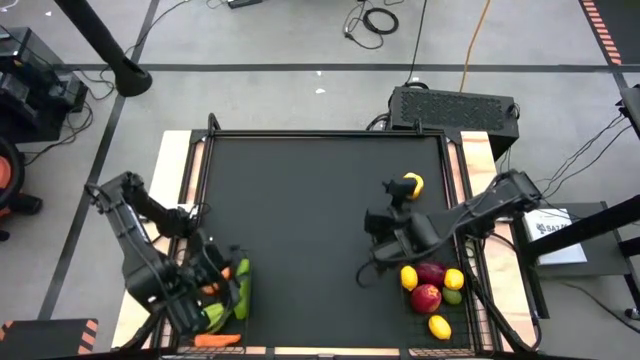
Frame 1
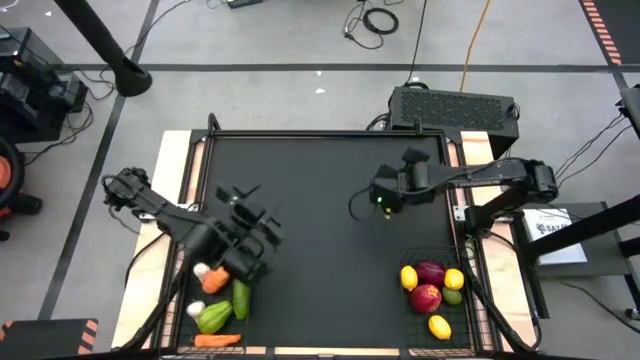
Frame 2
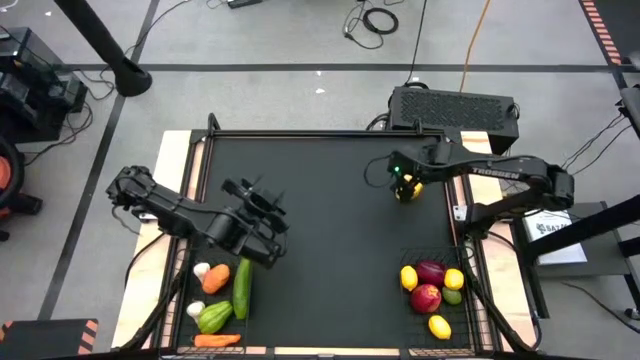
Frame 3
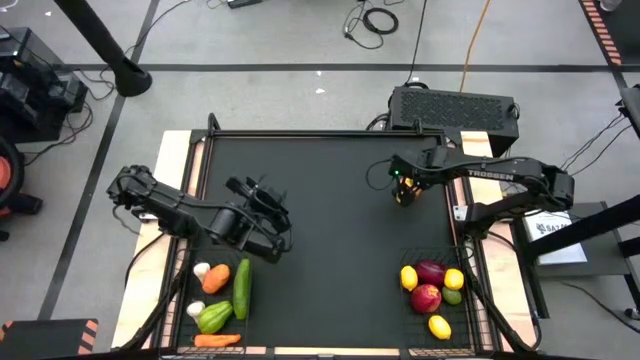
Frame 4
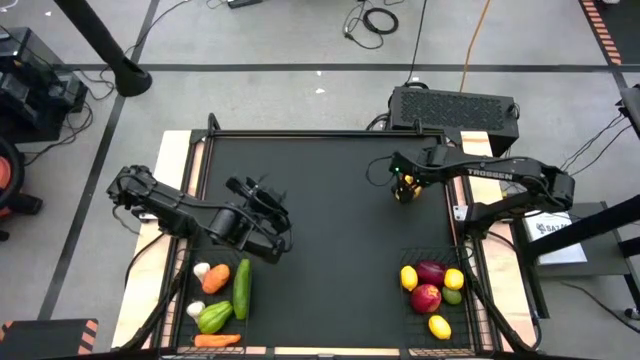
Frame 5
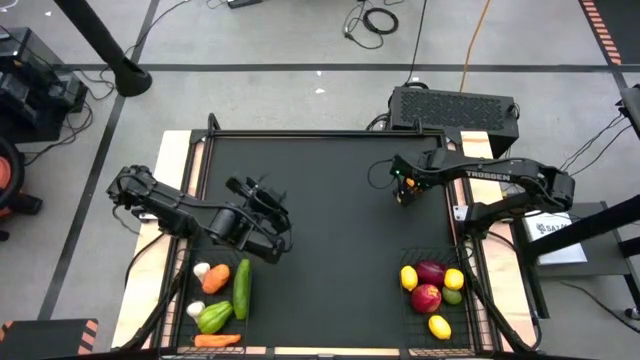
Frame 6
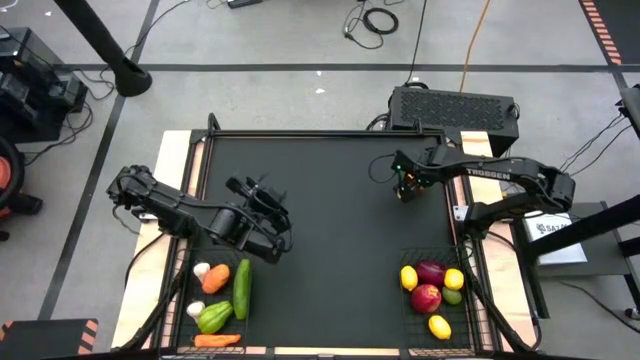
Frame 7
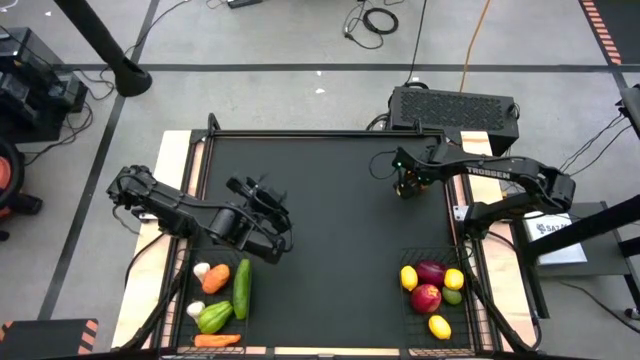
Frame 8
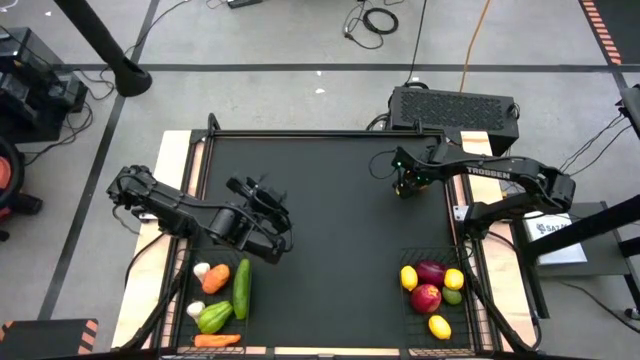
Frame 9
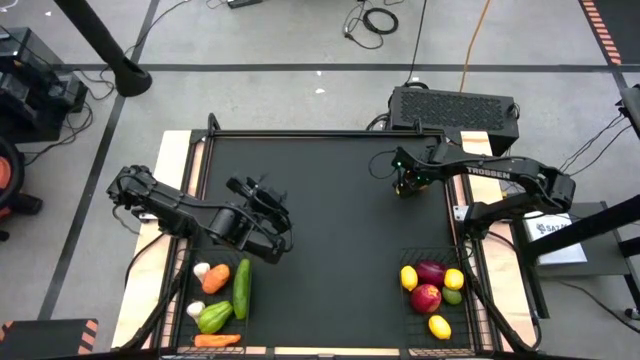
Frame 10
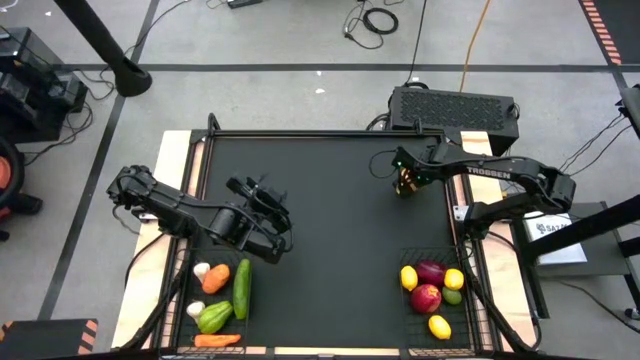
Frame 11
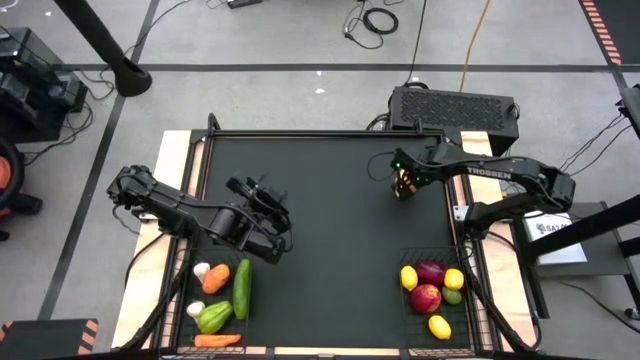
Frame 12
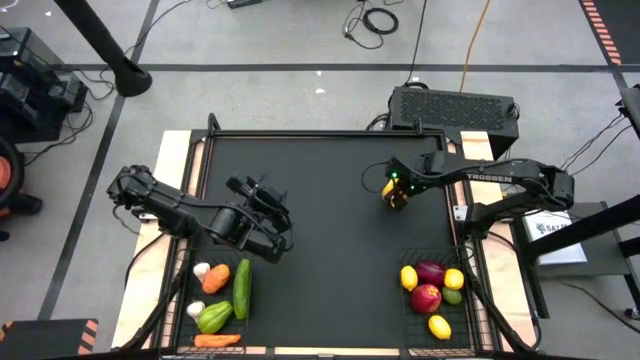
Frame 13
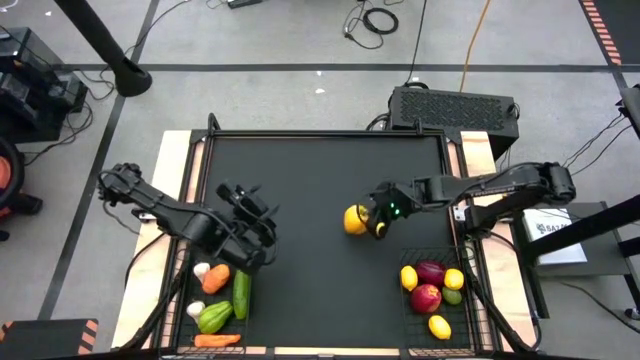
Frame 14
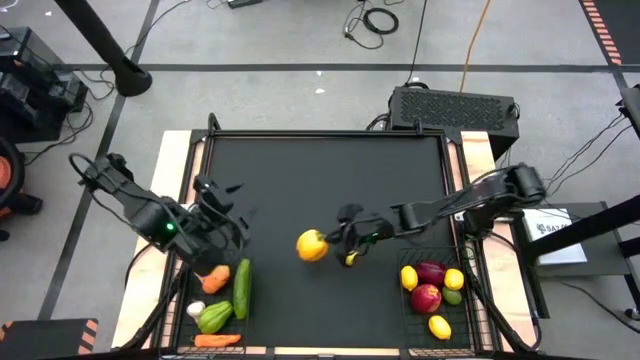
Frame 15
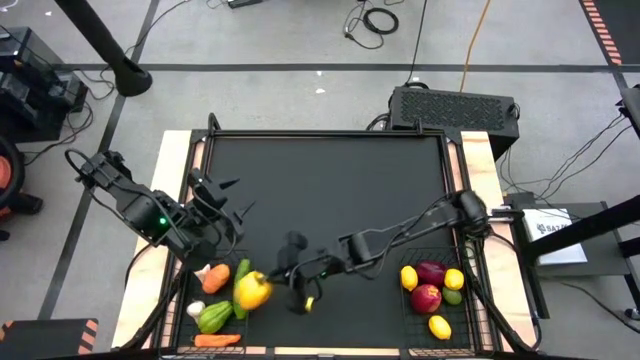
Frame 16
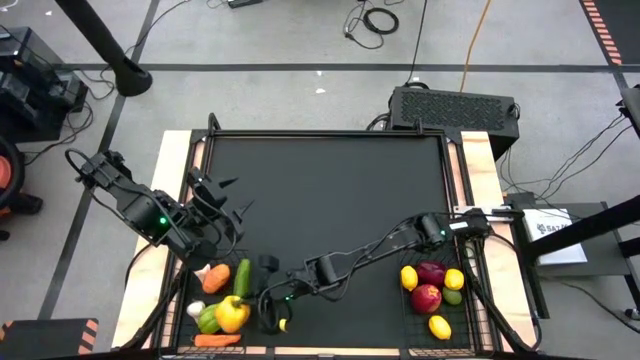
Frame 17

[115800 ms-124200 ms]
Task: Sort produce into baskets
Put the yellow capsicum into the bottom left basket

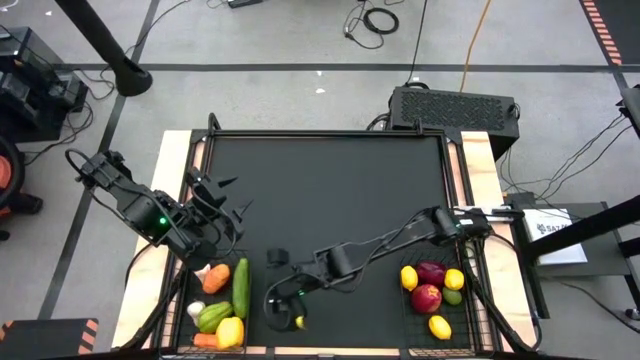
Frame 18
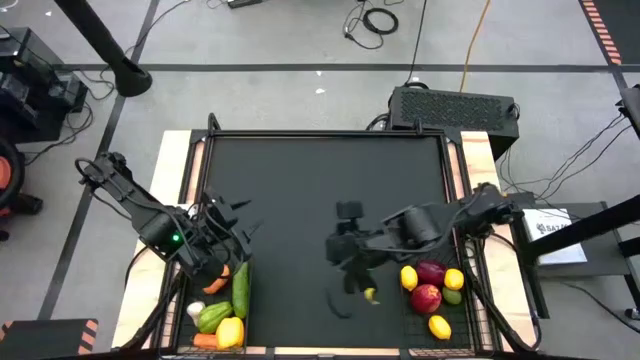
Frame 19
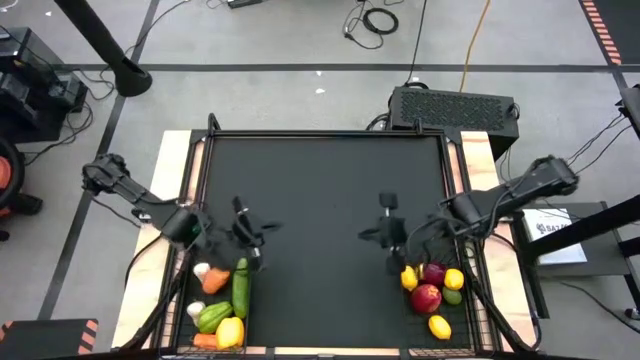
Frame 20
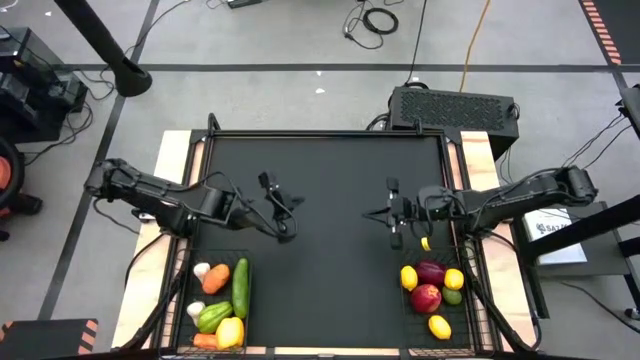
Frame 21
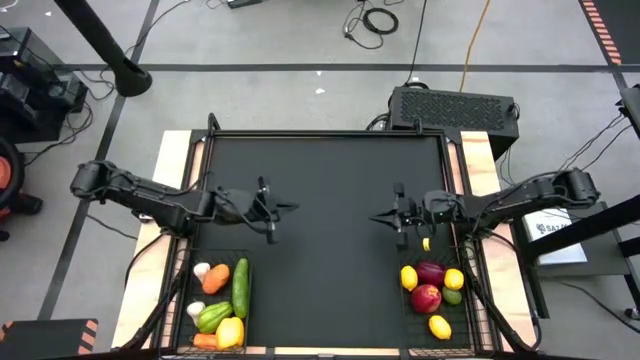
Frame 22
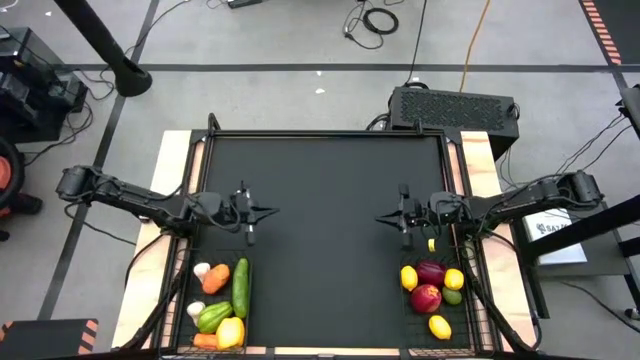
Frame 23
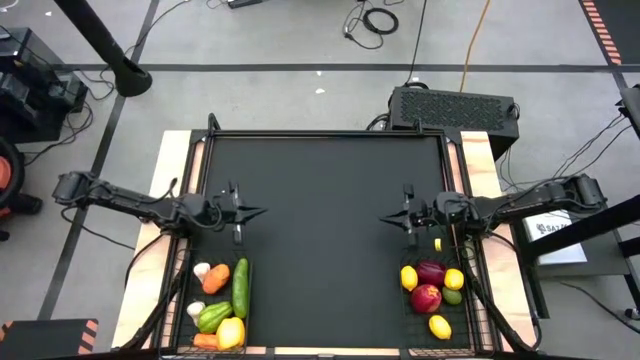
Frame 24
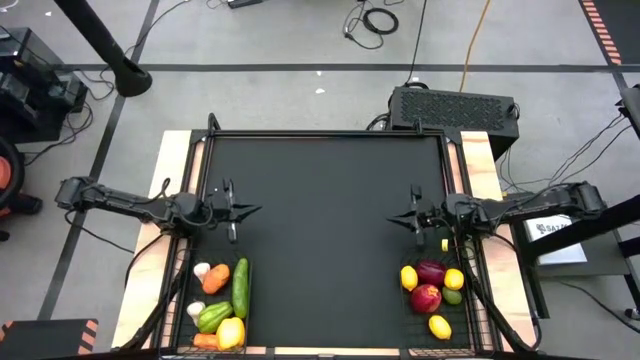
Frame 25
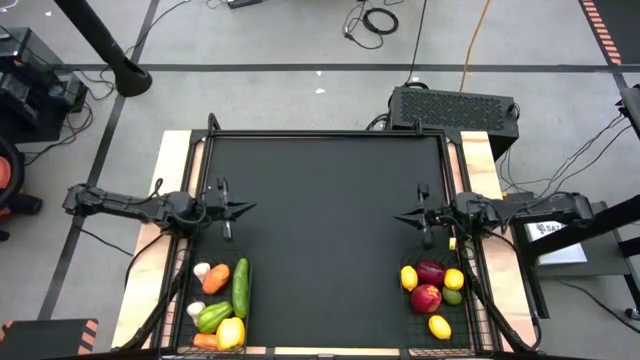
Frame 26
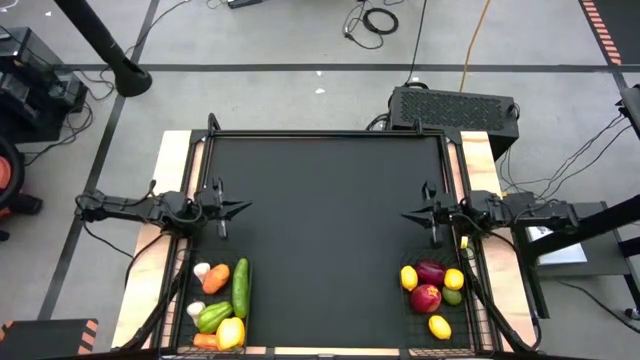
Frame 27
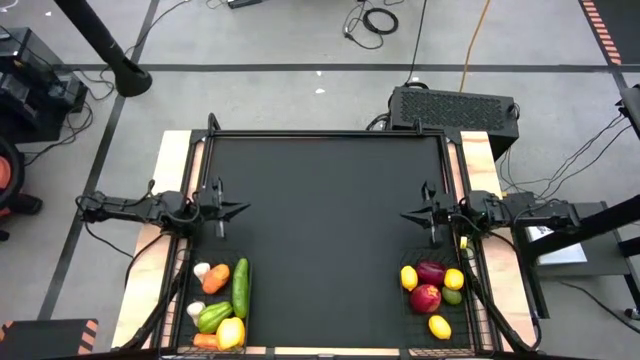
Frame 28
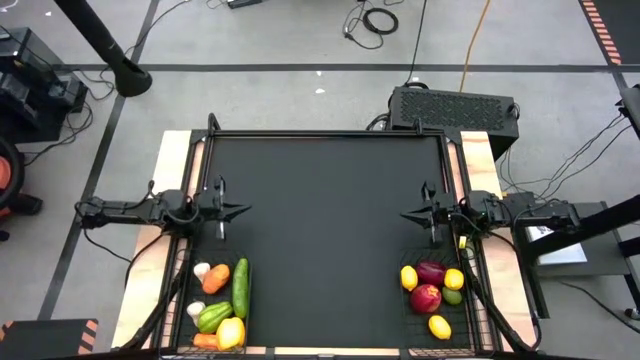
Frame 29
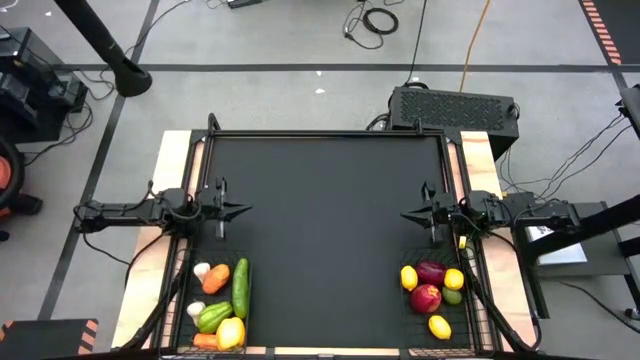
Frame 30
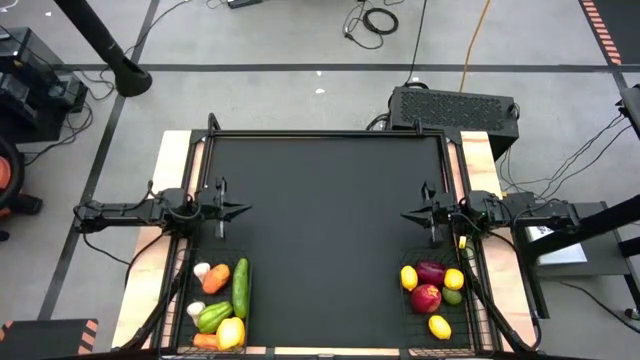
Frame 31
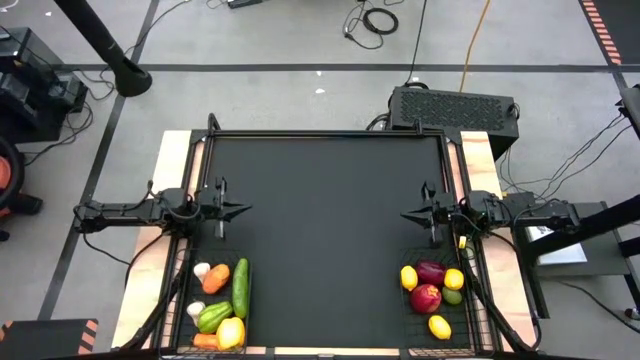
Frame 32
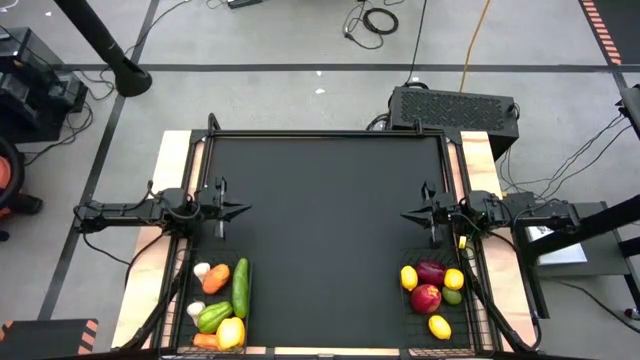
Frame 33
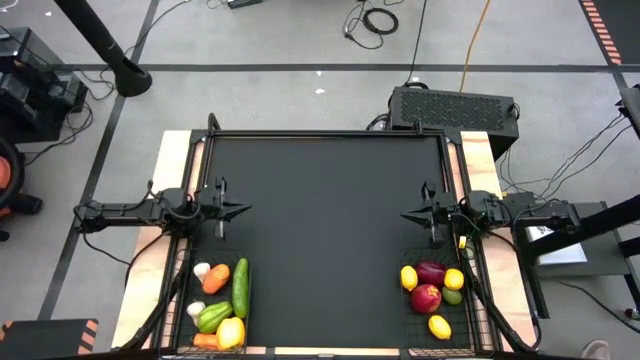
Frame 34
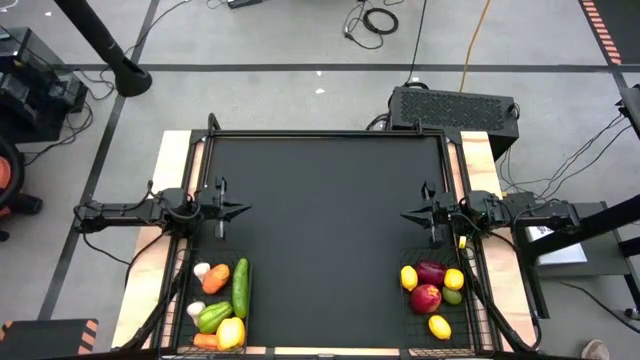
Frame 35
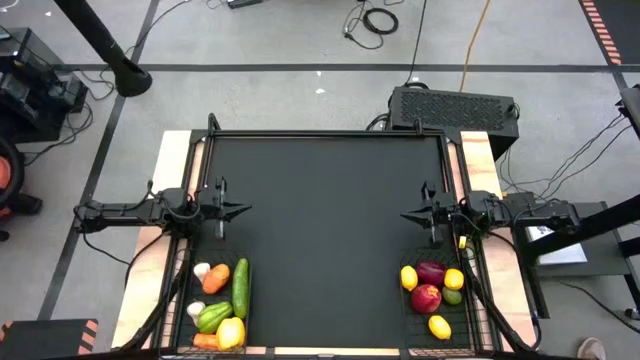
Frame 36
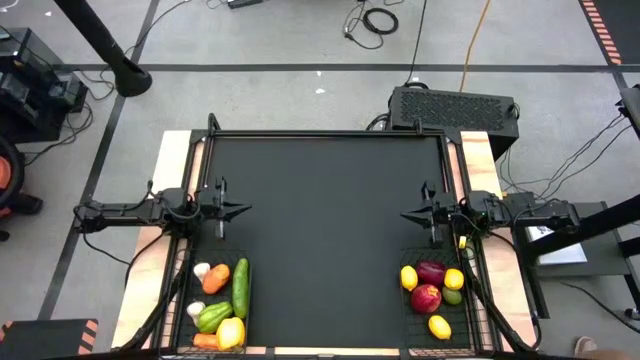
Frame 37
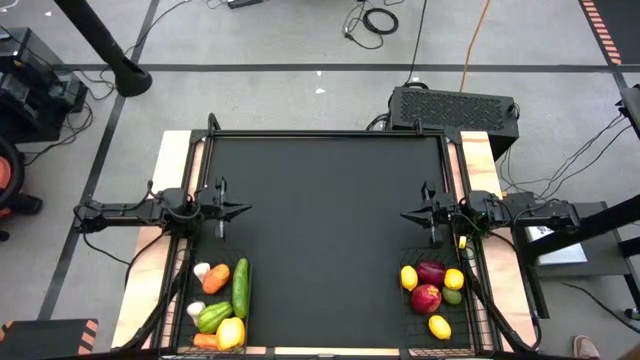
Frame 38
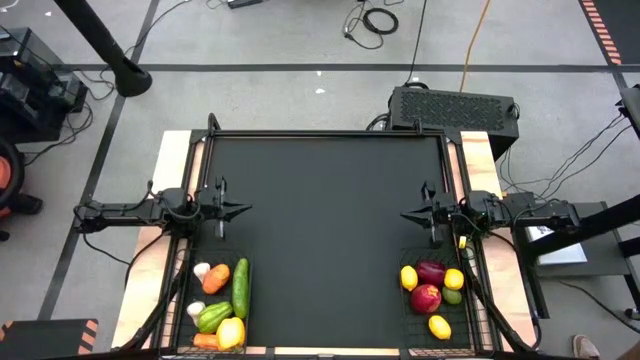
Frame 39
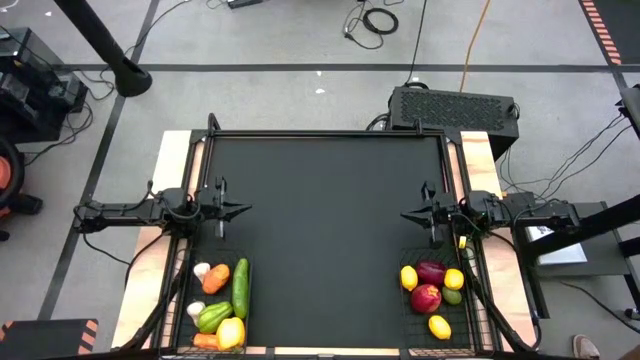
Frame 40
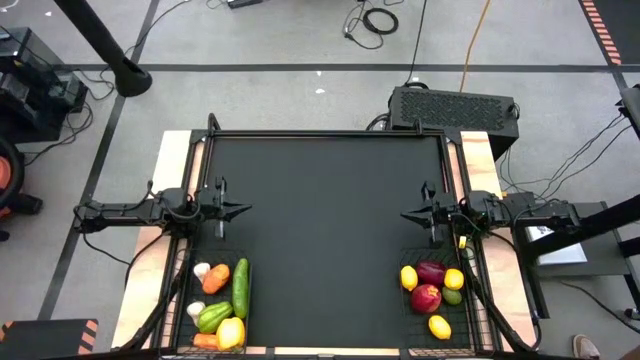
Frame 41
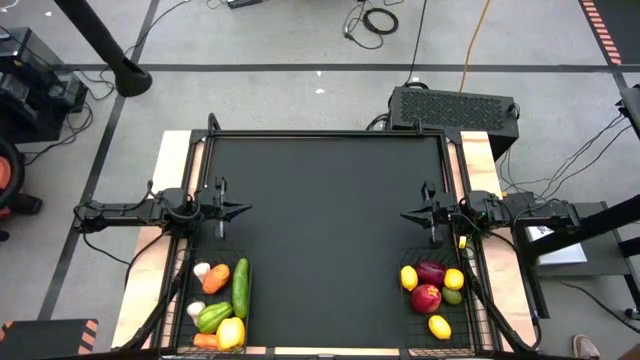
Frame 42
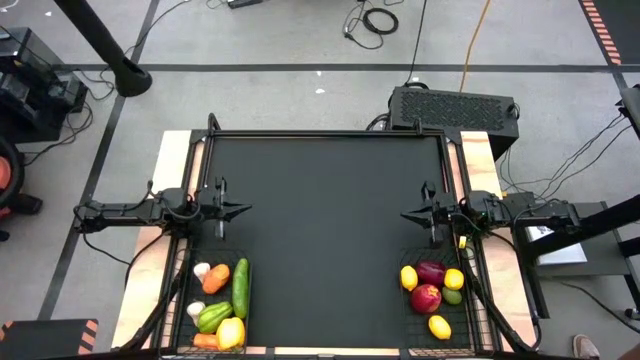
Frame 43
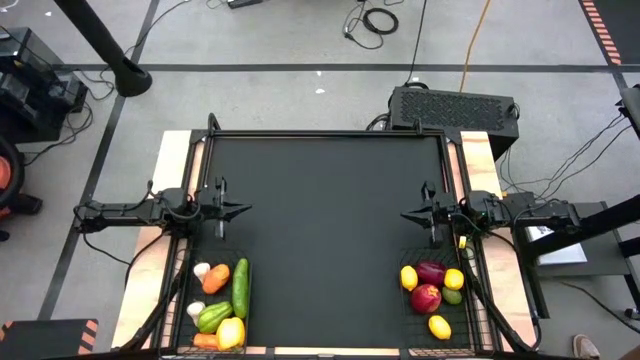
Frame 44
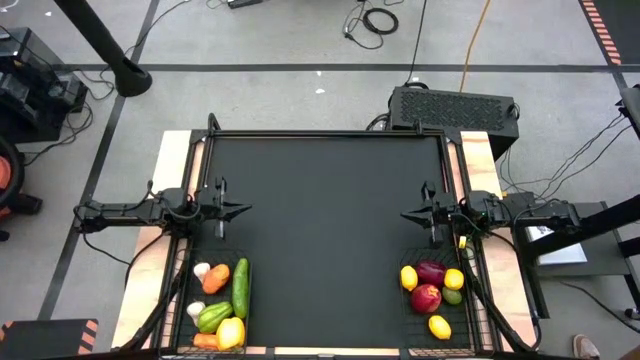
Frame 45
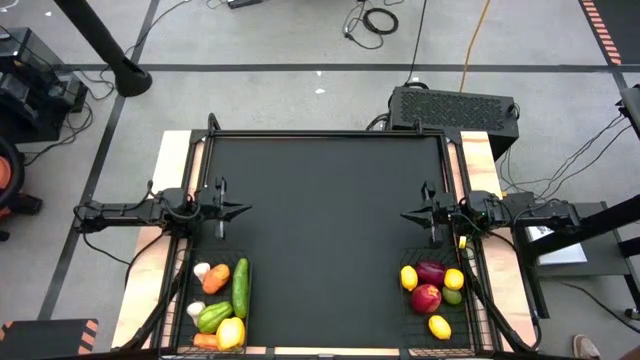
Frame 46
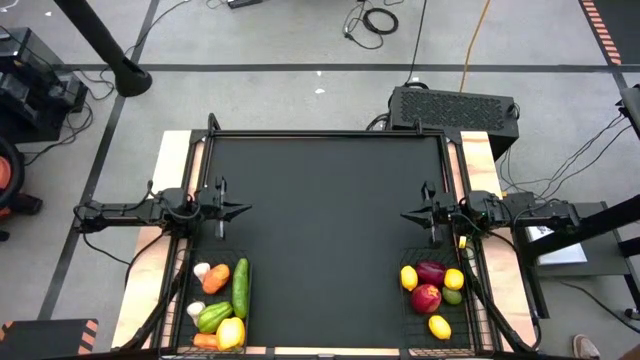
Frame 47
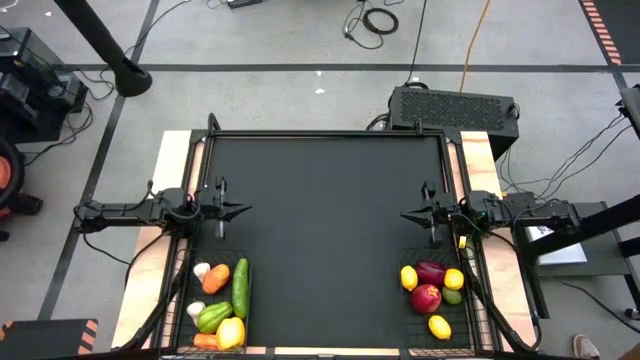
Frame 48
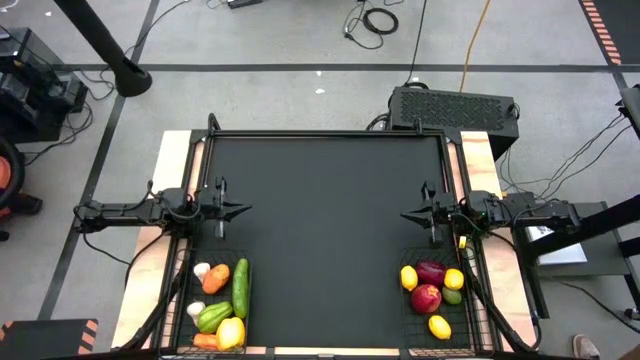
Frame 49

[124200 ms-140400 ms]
Return to Home Position
